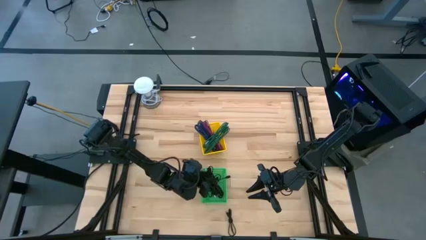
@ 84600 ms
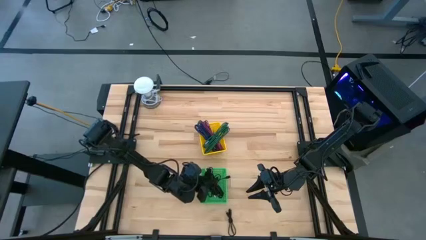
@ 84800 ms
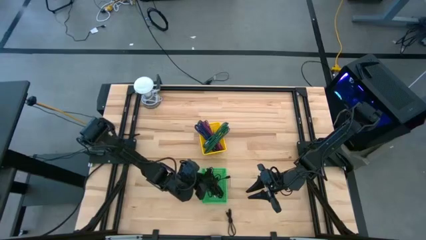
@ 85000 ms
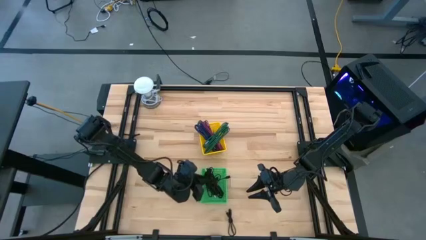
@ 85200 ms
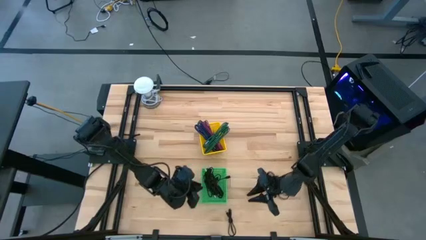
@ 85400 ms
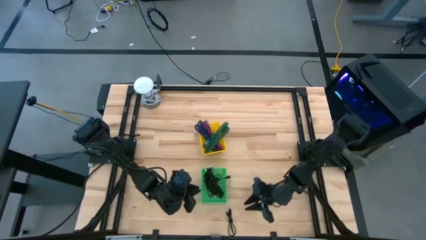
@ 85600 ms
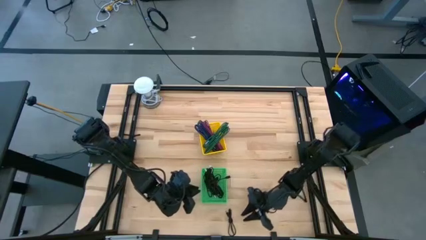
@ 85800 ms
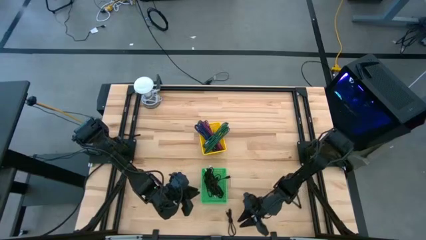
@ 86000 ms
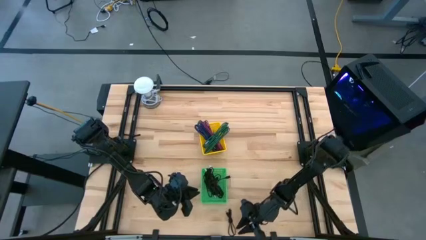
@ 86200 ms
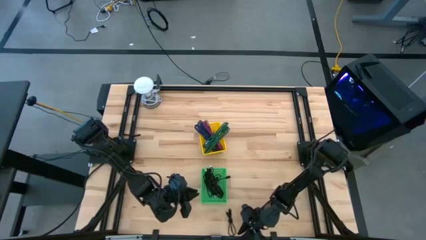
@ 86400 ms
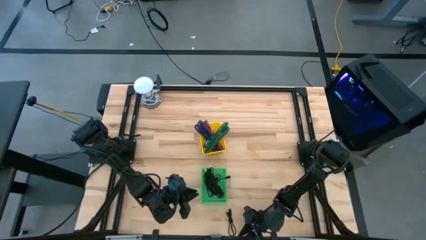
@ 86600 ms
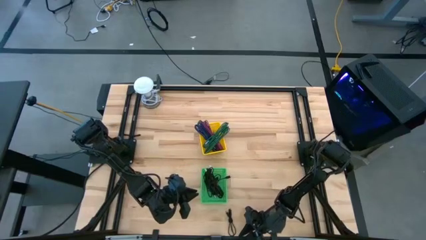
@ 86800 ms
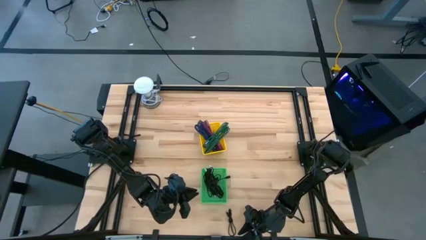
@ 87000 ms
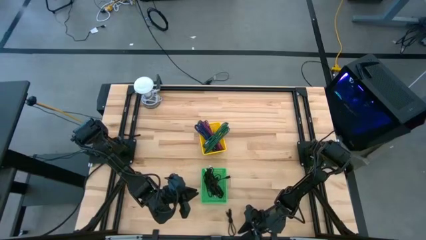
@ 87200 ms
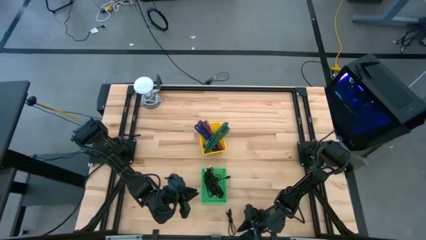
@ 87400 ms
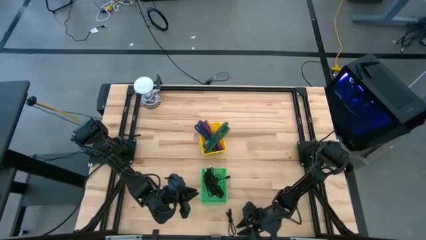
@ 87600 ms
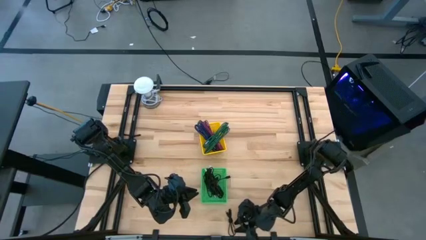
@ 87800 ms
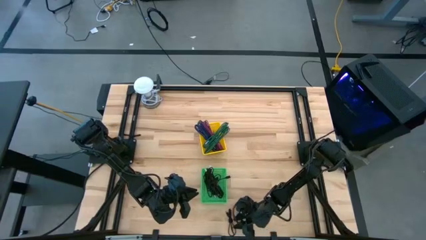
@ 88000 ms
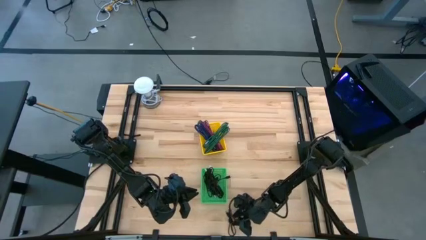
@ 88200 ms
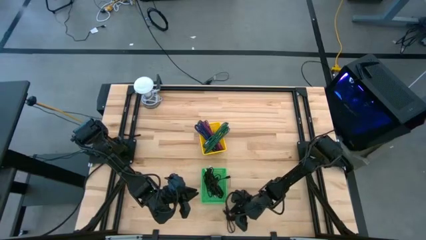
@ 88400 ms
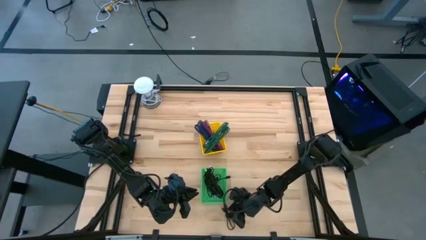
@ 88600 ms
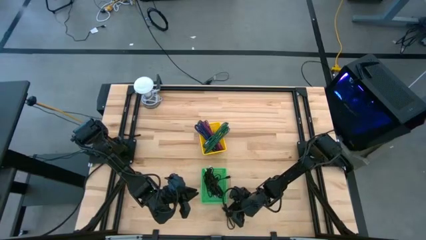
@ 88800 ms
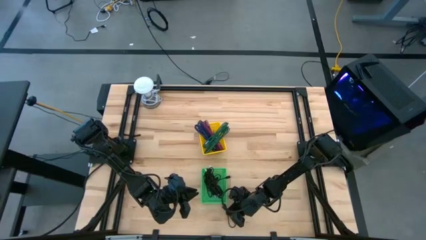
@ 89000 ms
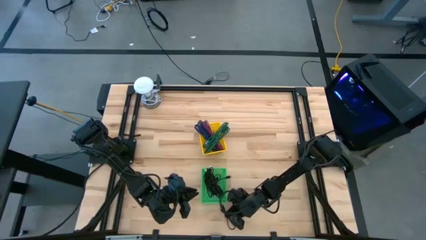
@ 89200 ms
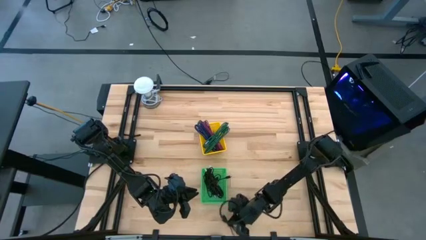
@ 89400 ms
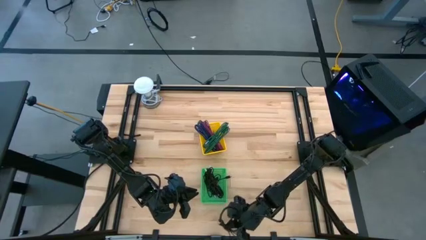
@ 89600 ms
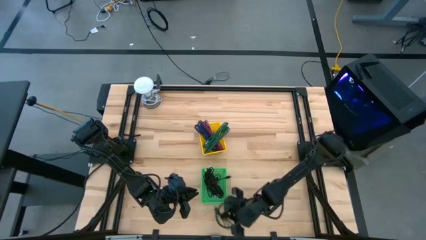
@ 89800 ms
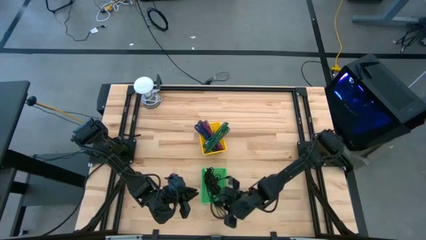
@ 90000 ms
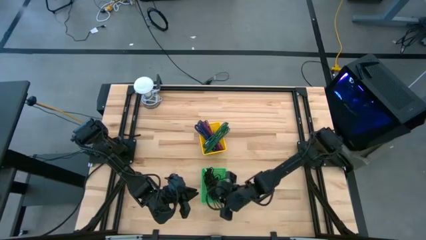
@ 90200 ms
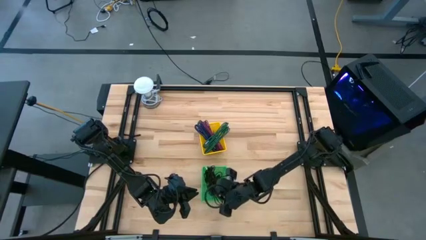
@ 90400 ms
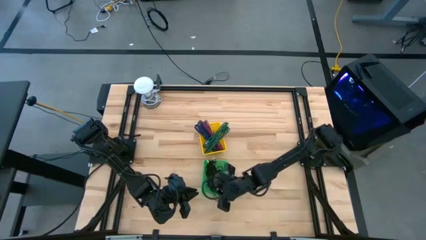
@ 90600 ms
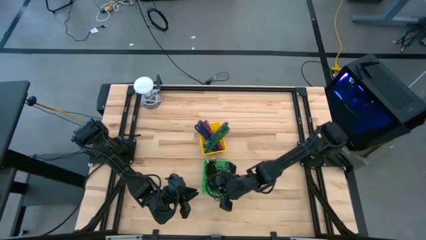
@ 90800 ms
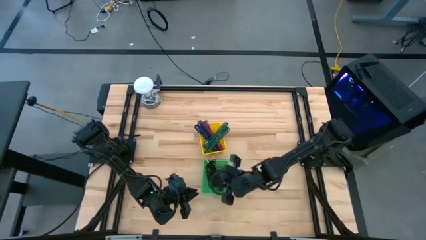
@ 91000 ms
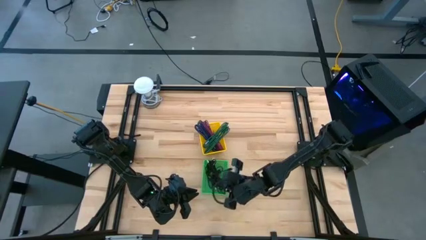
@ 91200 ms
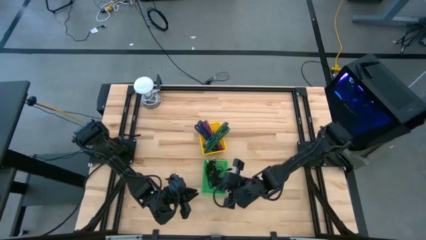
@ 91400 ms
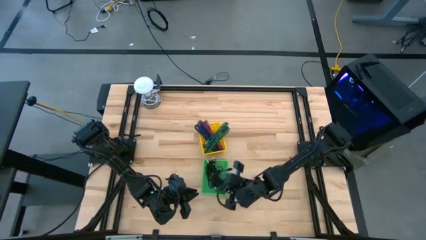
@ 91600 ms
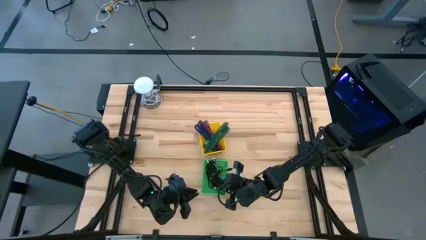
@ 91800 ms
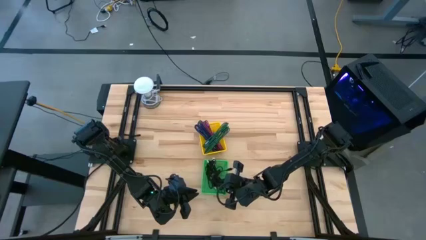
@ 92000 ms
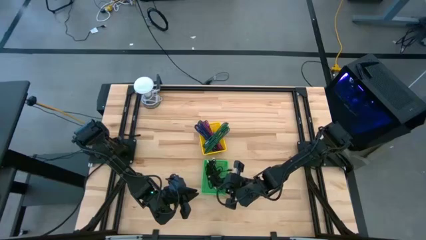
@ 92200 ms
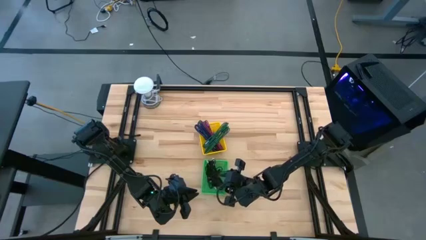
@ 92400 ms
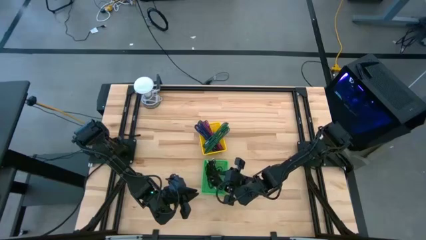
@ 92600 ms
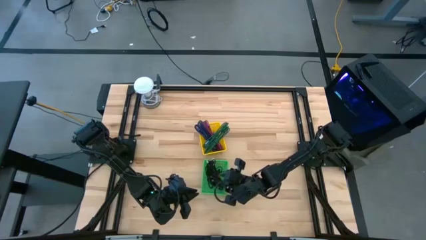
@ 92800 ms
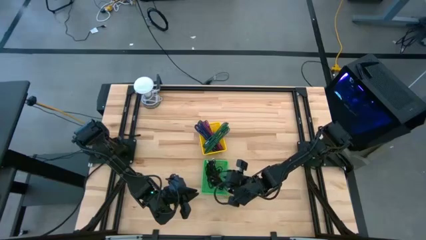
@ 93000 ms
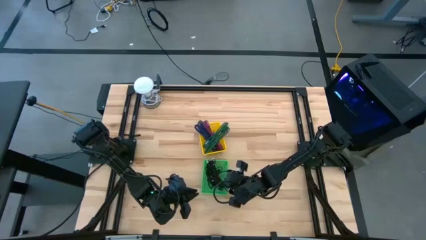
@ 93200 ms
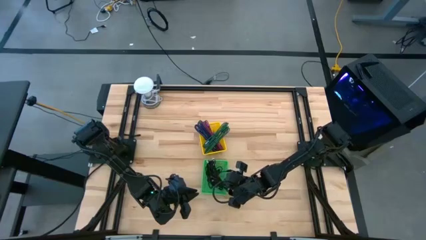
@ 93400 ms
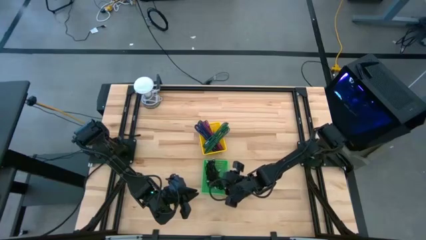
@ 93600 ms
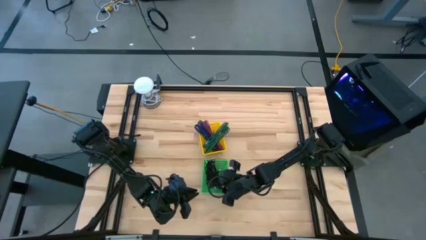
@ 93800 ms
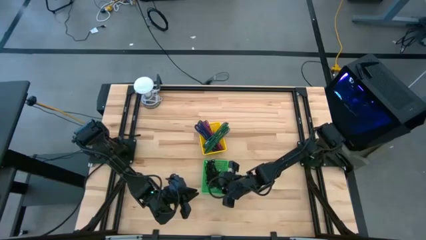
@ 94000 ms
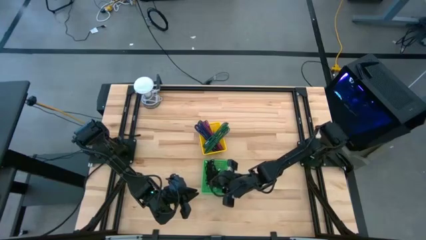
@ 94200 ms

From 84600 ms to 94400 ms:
Task: Pick & Place USB Port
Put the black charger cable into the green bin

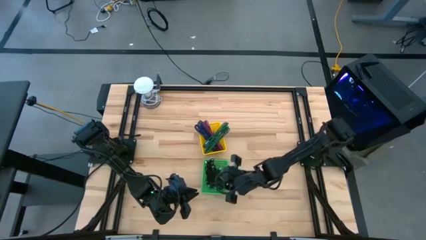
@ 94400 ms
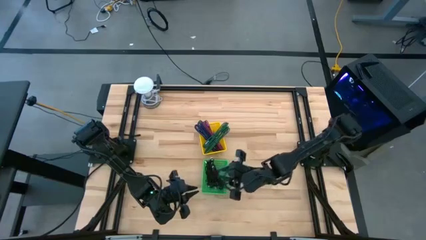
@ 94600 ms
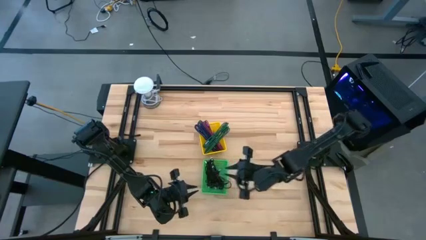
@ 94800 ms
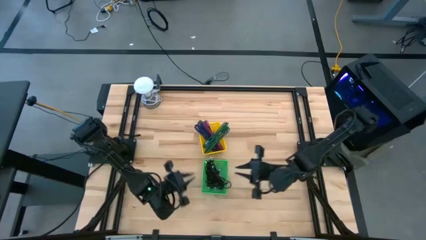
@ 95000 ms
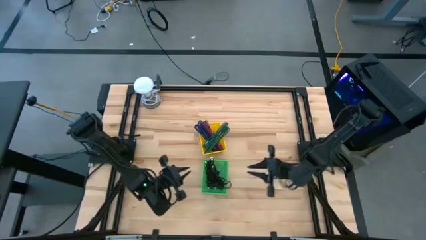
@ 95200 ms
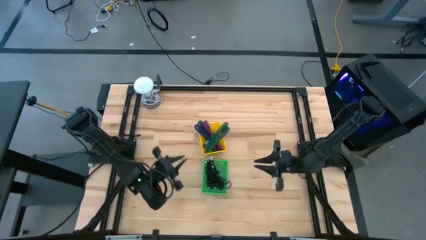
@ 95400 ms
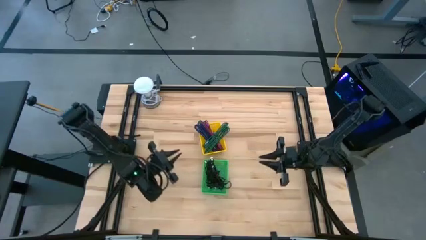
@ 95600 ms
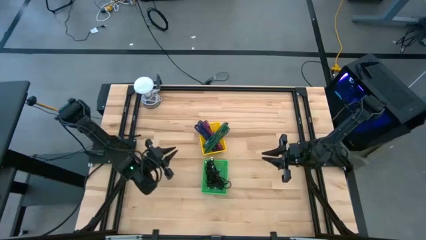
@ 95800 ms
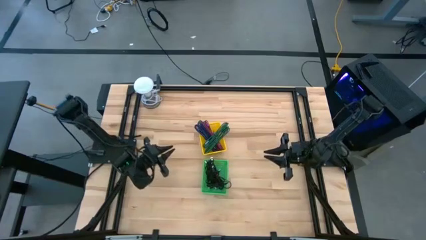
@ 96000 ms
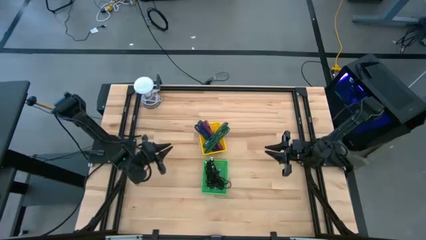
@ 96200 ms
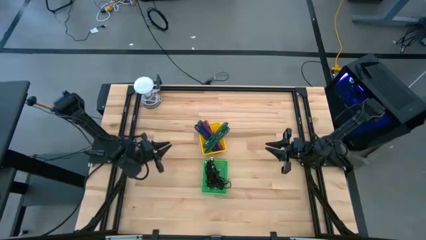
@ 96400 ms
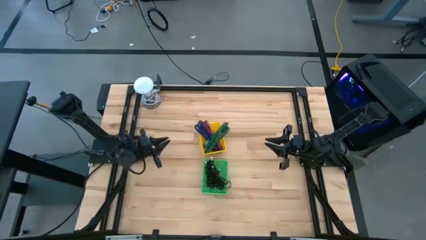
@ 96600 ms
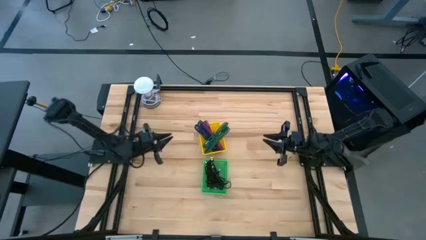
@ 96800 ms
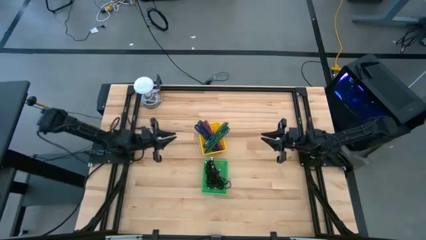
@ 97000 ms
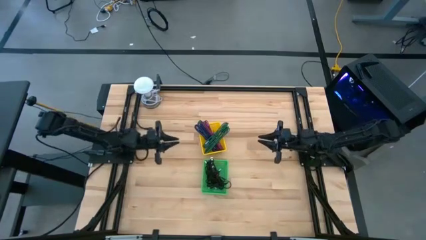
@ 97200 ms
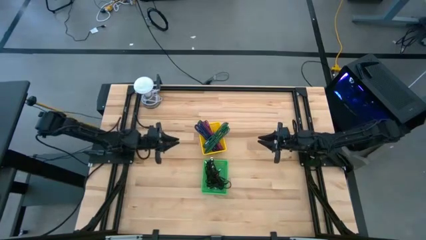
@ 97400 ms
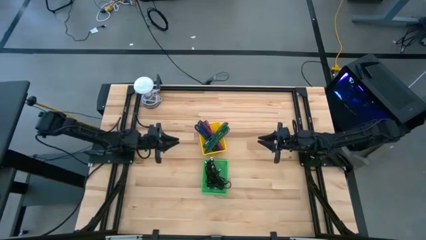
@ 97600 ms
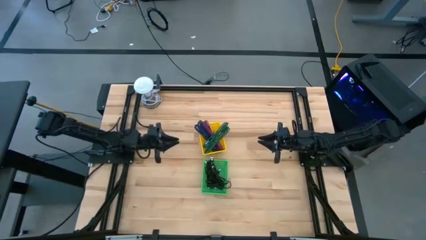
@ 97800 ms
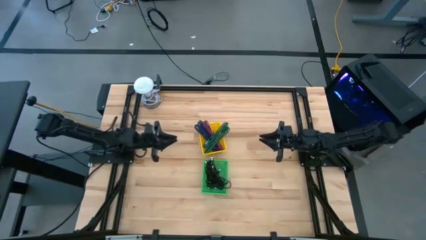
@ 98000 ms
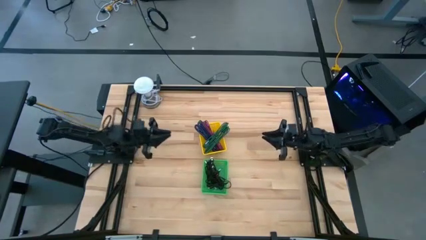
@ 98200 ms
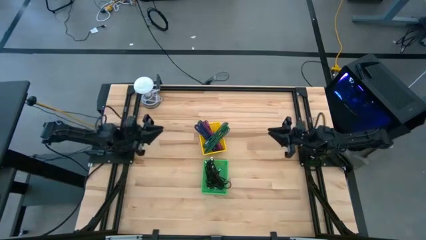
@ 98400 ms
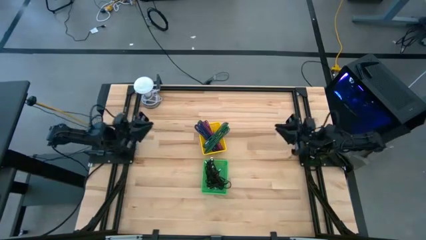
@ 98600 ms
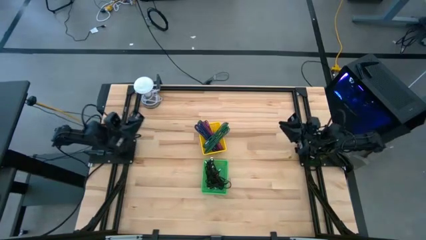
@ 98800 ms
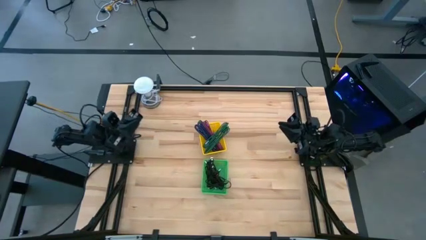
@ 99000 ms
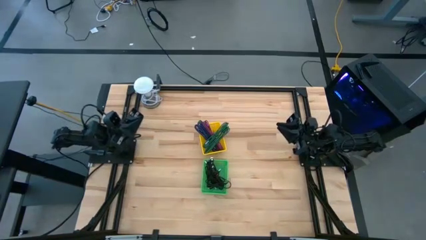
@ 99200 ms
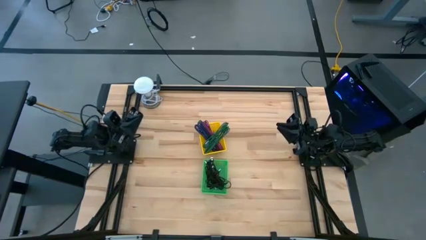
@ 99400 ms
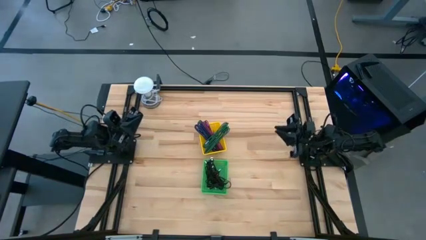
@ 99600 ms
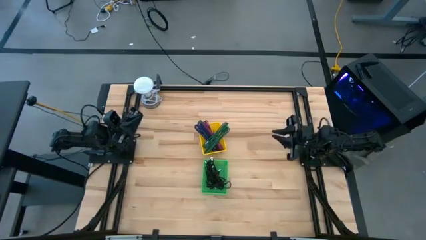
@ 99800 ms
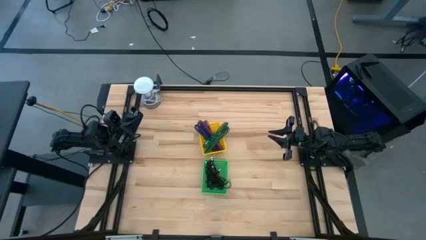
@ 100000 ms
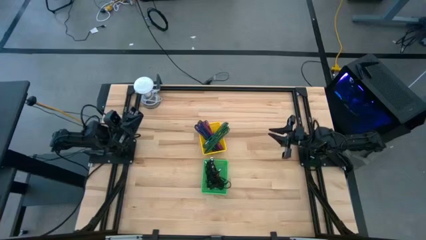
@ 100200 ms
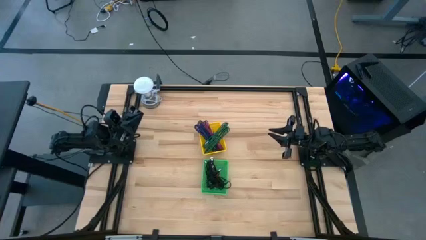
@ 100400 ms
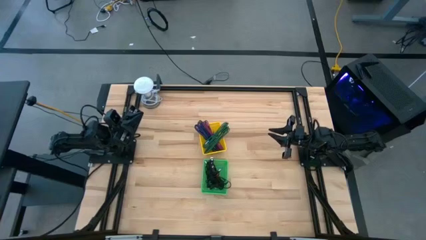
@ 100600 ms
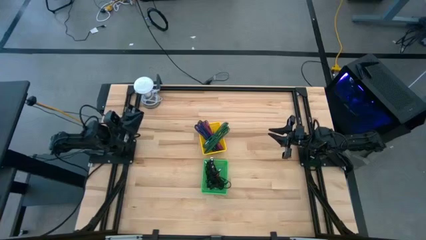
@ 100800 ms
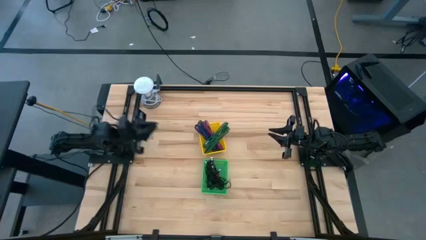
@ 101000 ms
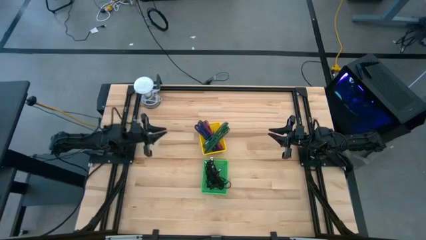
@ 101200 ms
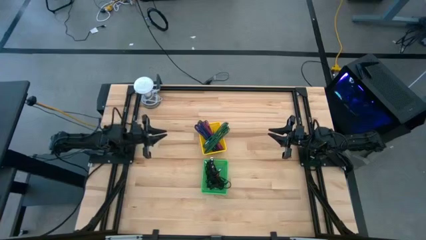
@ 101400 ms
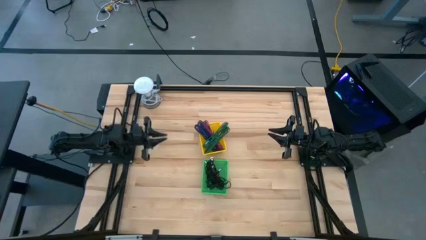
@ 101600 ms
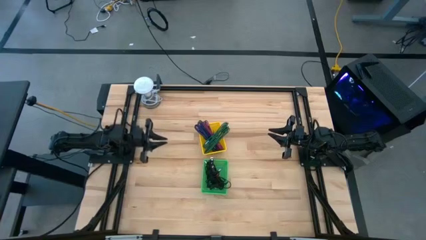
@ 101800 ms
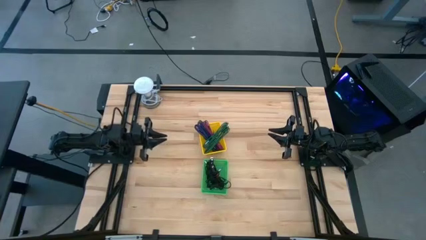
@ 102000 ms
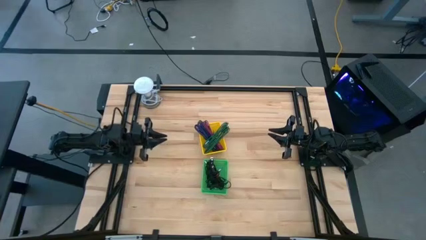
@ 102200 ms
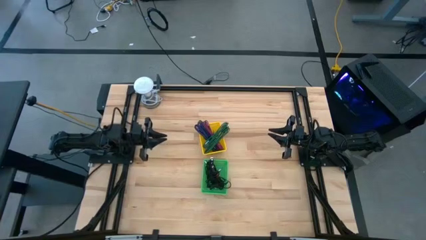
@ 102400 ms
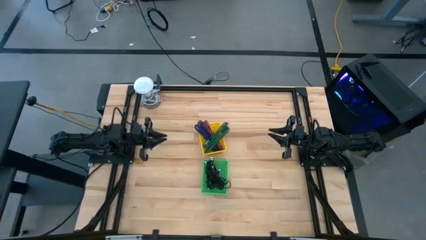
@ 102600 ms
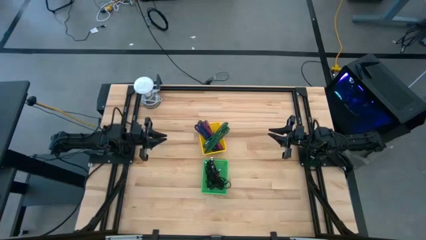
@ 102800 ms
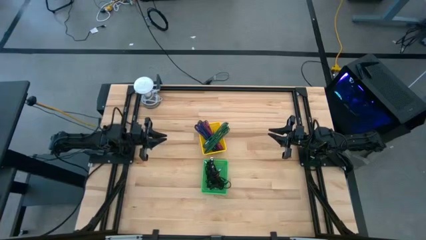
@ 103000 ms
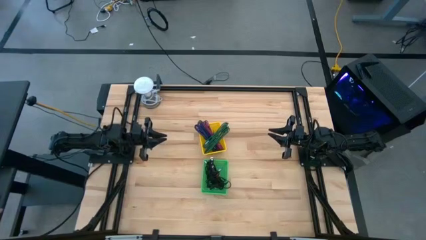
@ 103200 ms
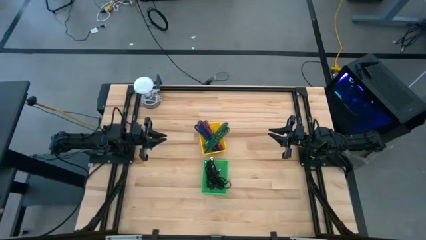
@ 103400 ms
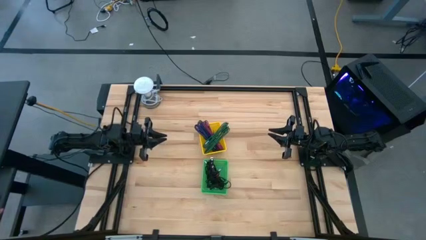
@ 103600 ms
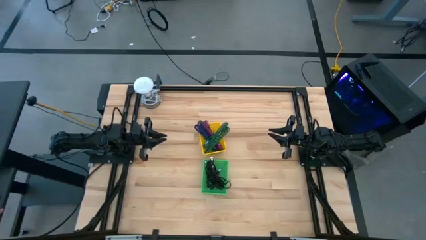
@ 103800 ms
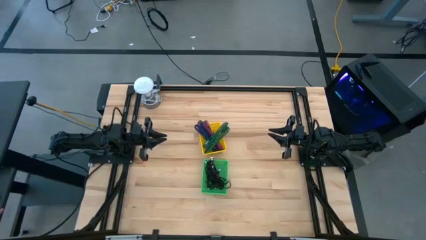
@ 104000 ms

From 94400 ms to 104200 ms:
Return to Home Position
